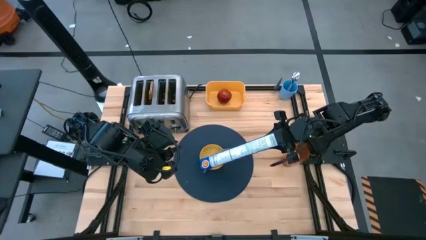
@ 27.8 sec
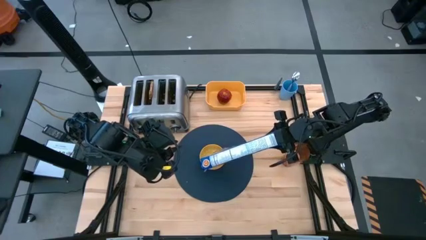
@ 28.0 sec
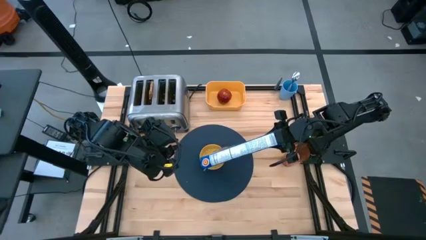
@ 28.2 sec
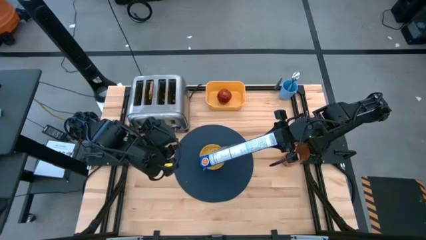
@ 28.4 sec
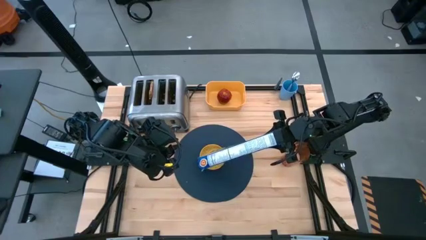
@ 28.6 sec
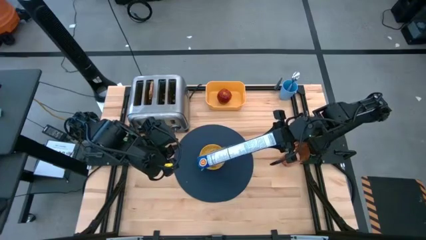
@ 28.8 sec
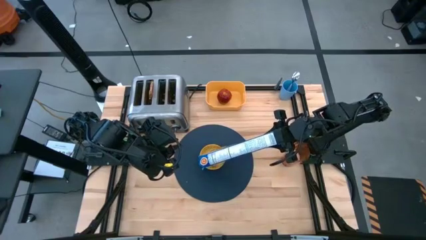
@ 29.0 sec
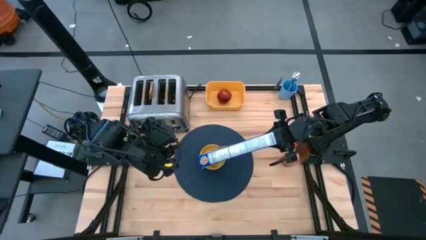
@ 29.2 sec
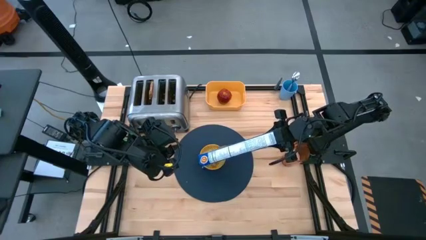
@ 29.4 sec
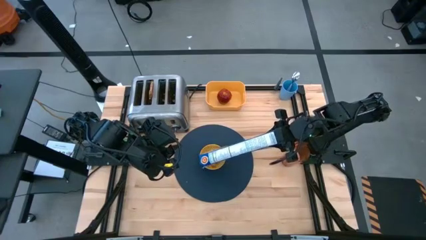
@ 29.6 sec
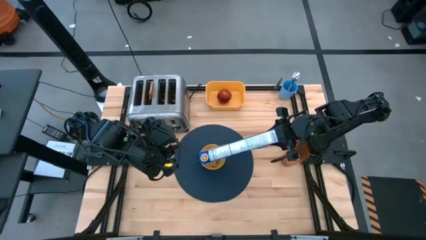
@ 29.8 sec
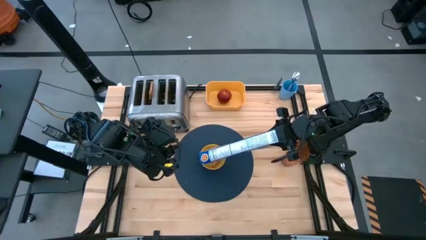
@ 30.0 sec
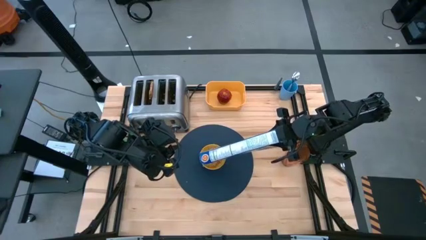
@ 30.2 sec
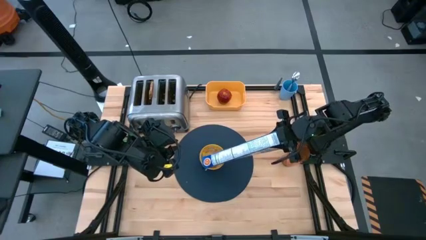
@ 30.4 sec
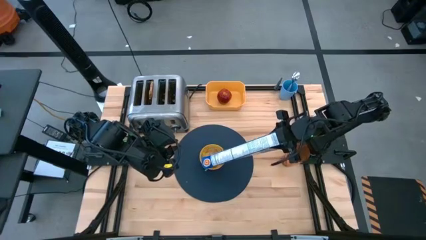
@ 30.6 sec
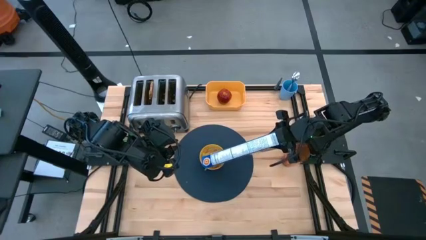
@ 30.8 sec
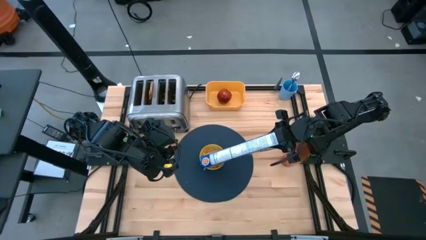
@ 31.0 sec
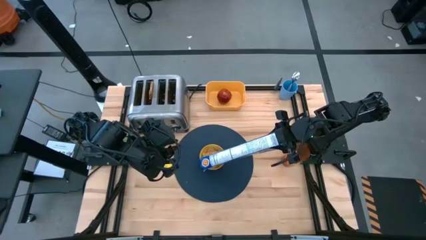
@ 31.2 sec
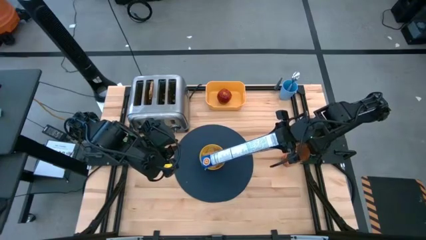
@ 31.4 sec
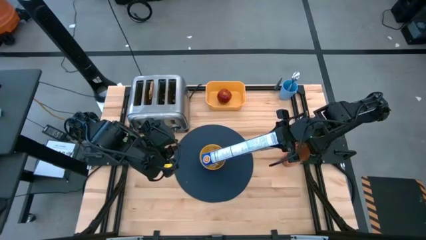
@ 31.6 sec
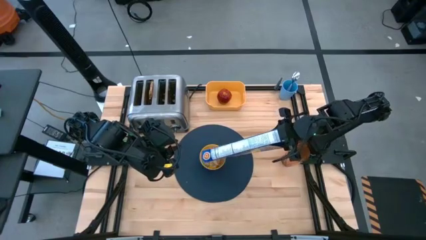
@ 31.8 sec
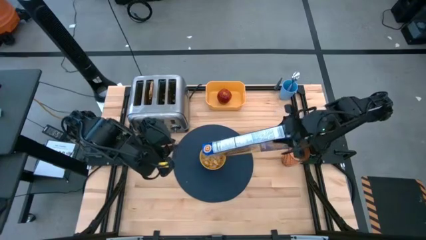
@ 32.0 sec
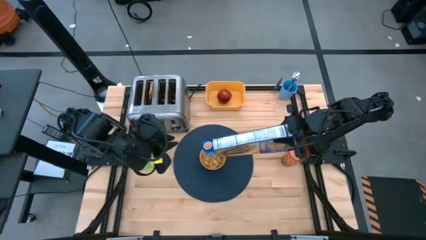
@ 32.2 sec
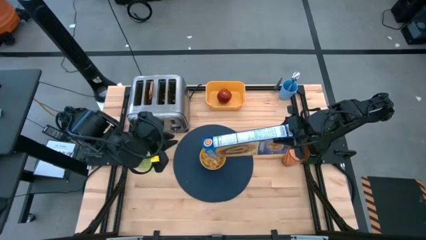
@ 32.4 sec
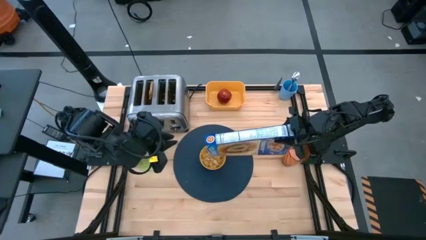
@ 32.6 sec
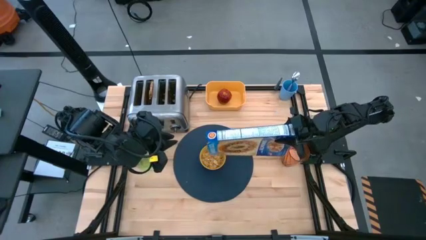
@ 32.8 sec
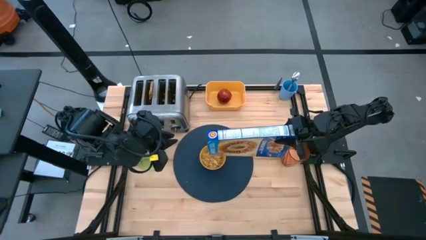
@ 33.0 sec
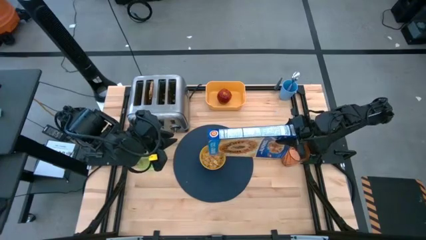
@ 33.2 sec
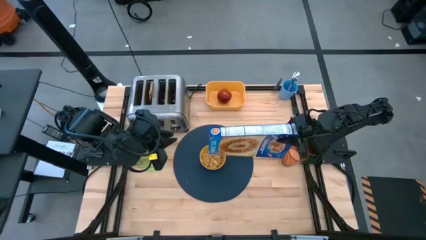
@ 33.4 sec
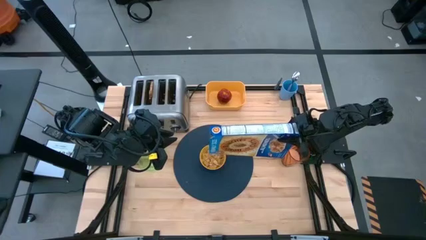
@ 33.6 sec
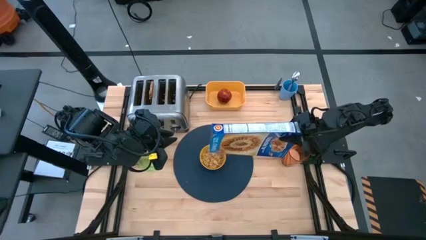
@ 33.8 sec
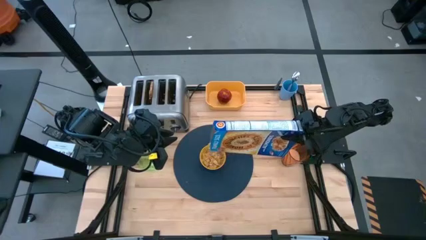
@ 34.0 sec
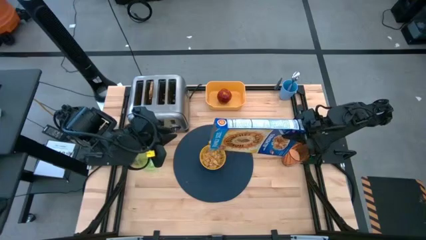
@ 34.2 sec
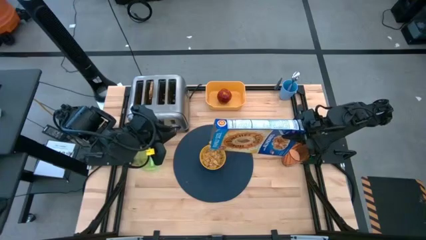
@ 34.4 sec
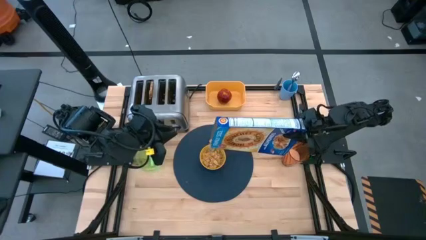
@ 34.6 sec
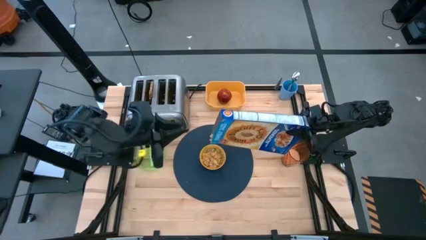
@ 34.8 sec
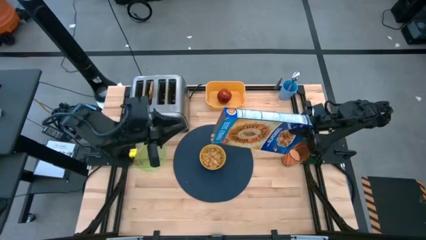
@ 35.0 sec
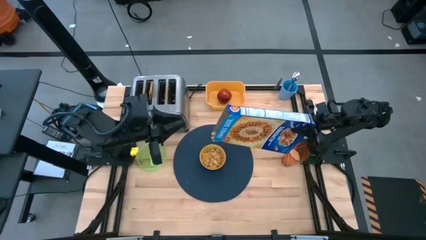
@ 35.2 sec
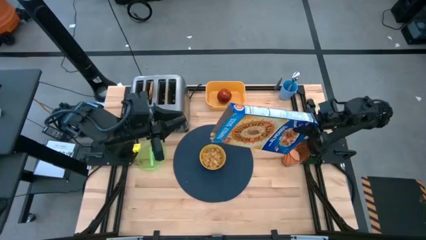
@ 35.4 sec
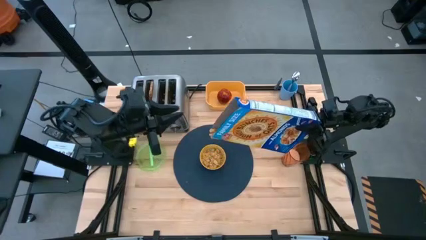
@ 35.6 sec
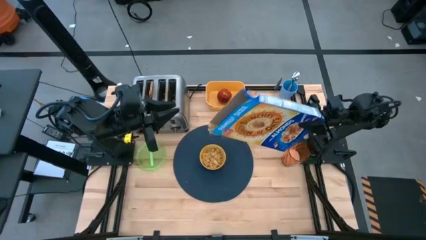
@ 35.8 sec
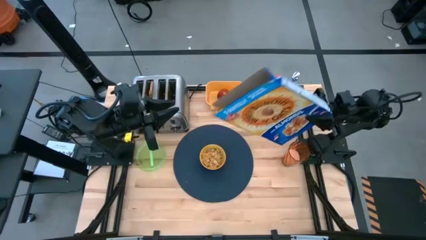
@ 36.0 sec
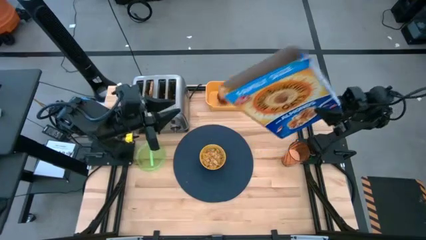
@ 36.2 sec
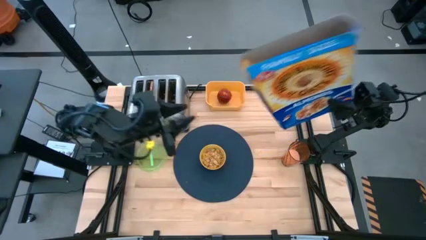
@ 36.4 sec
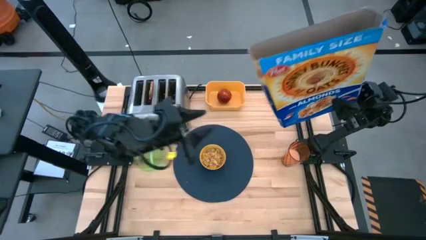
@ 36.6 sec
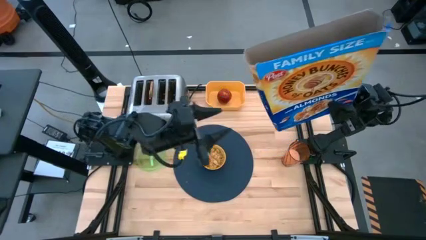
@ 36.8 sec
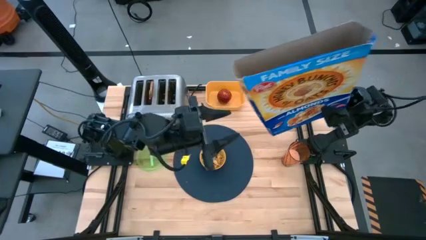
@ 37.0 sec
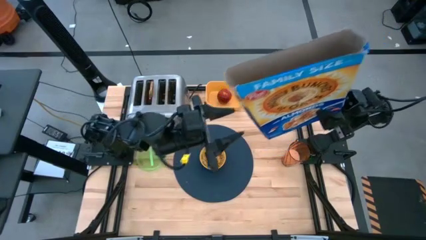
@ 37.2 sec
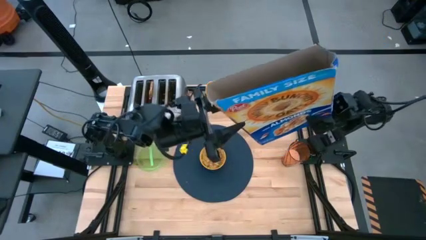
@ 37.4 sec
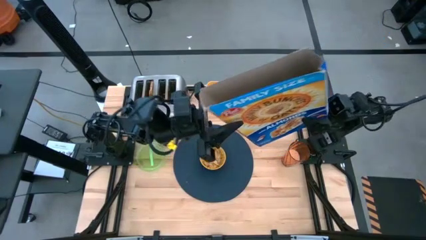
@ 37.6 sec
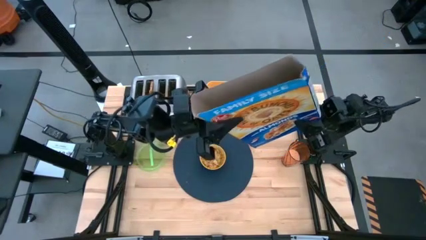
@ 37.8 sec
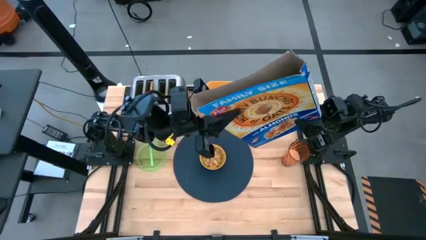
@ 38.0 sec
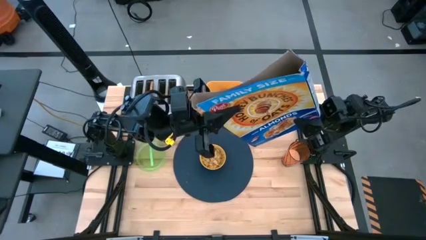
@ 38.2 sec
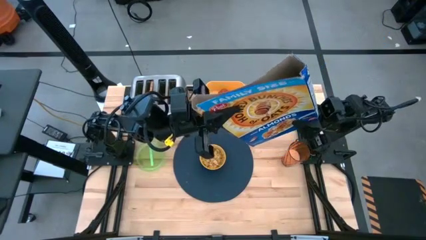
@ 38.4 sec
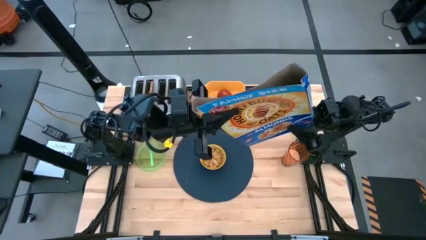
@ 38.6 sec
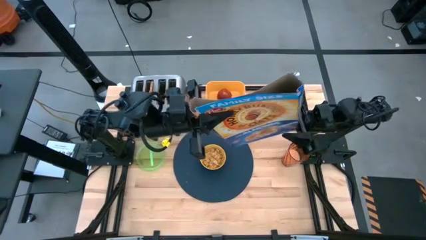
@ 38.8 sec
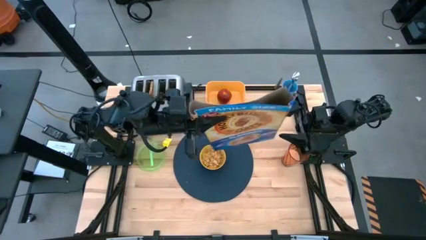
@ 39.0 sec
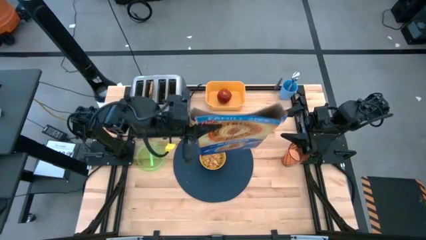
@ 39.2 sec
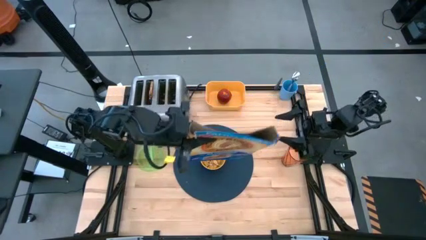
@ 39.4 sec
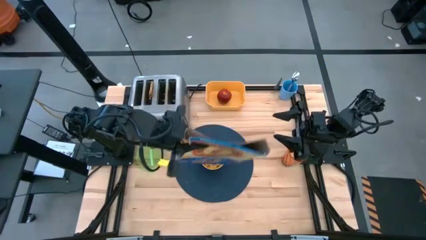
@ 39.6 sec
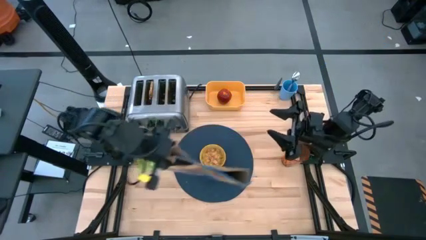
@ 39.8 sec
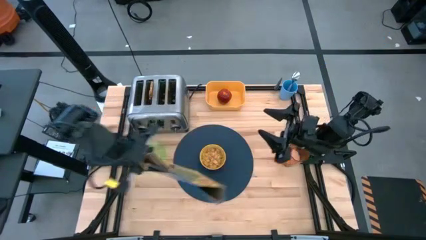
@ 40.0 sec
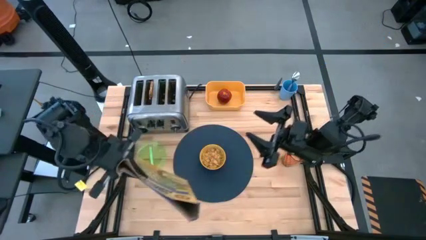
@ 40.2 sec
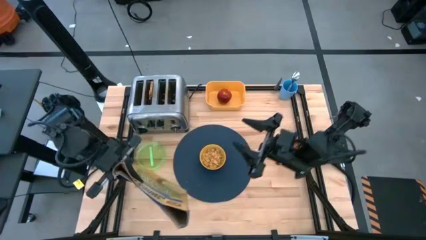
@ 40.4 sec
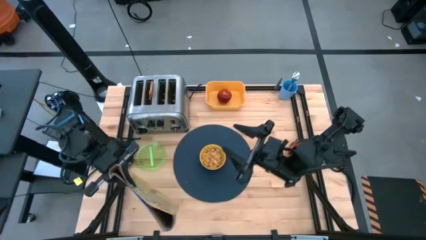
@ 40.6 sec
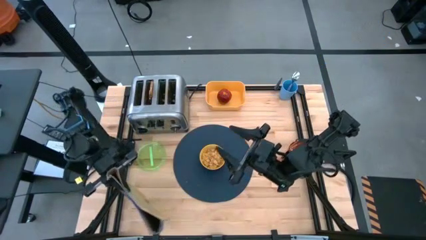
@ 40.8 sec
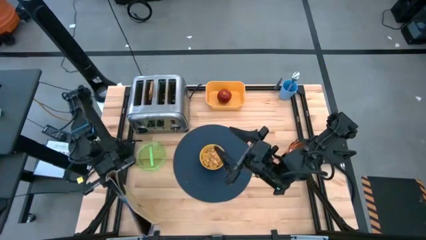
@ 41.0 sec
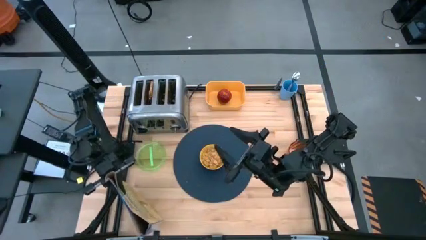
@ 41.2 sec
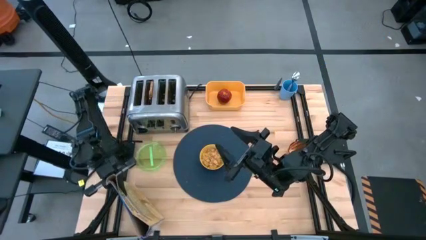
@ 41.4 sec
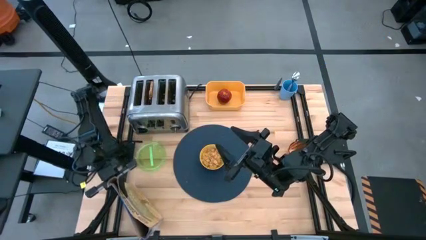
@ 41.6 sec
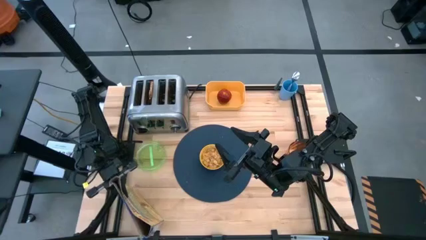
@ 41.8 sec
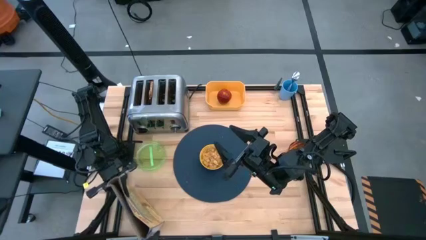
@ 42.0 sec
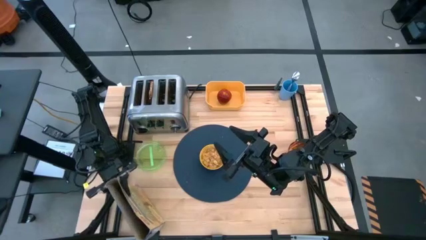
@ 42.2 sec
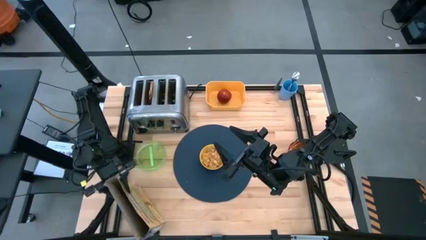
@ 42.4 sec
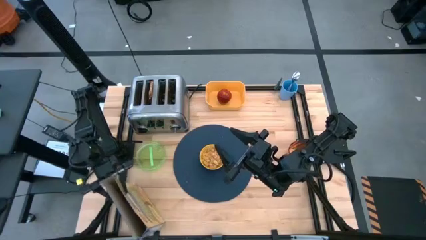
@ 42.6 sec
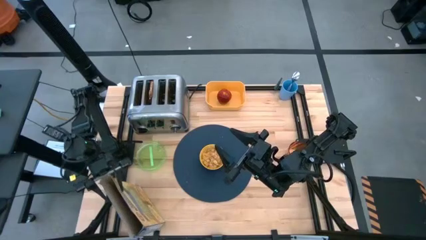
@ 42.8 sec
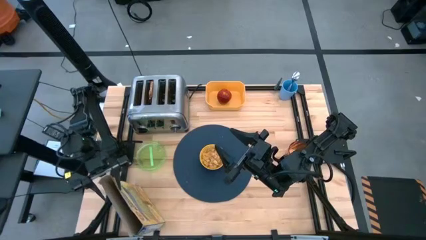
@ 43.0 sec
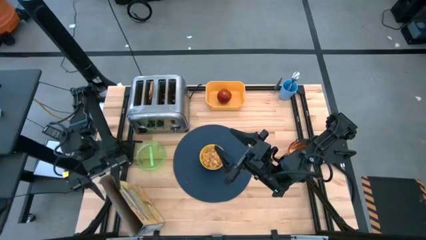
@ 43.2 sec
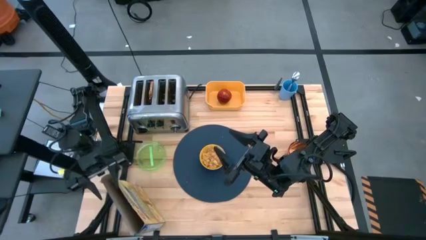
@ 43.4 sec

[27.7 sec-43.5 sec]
Task: Arrange a breakfast setting
Pour the cereal into the blue and yellow bowl
